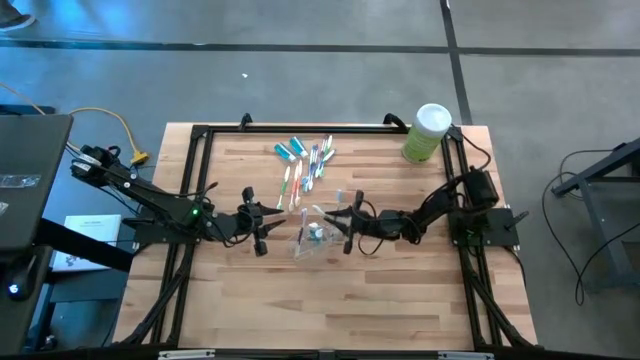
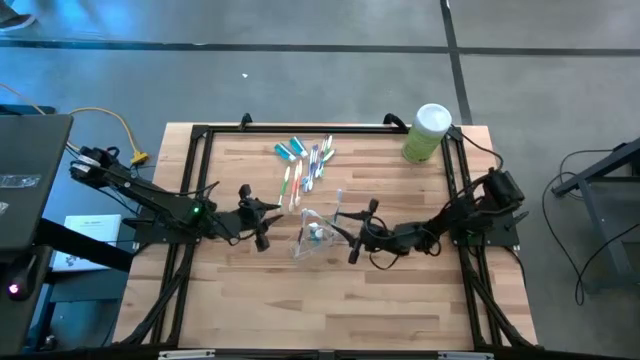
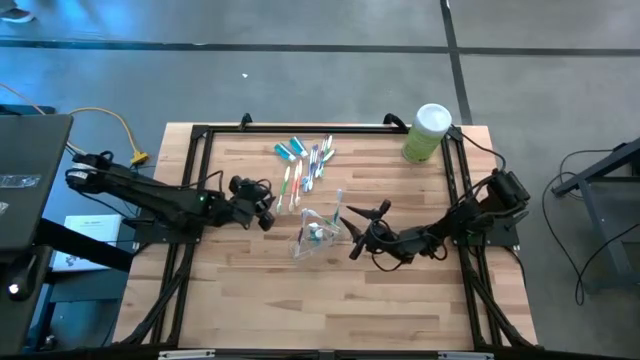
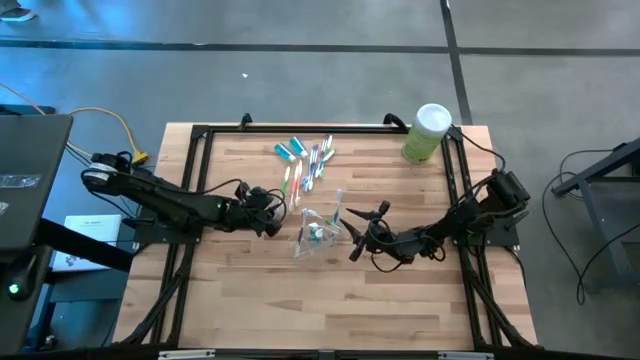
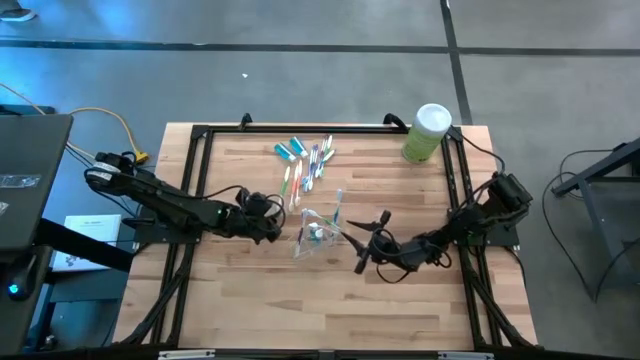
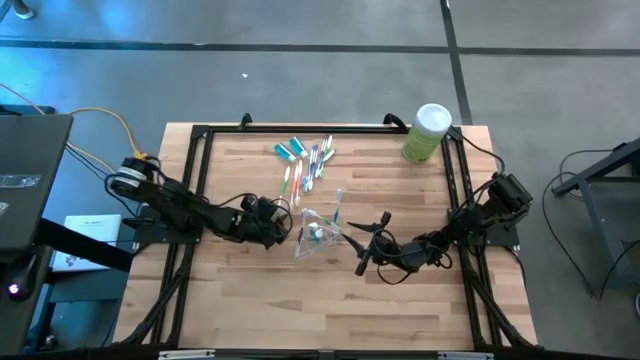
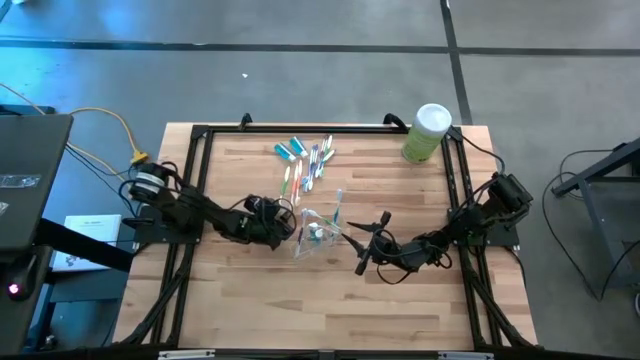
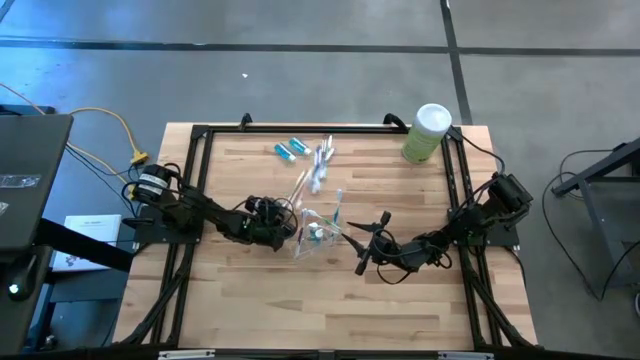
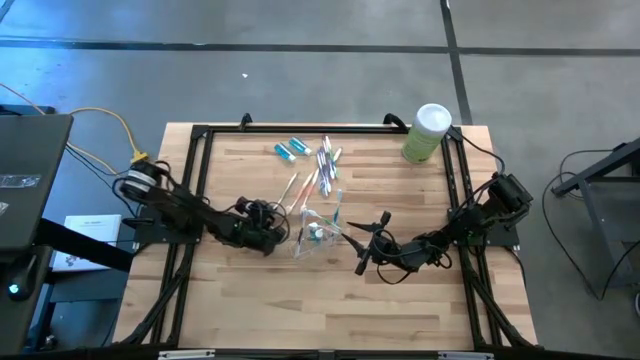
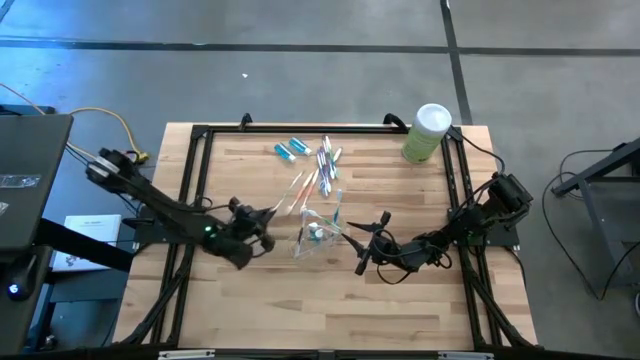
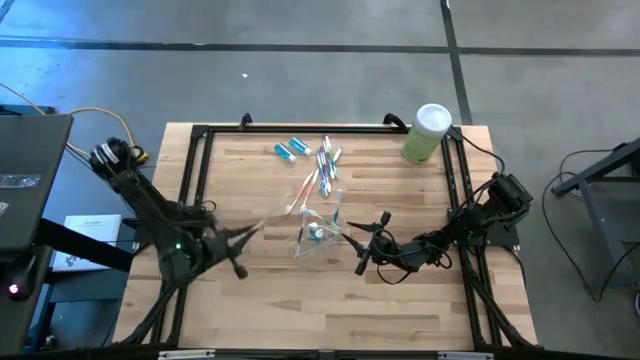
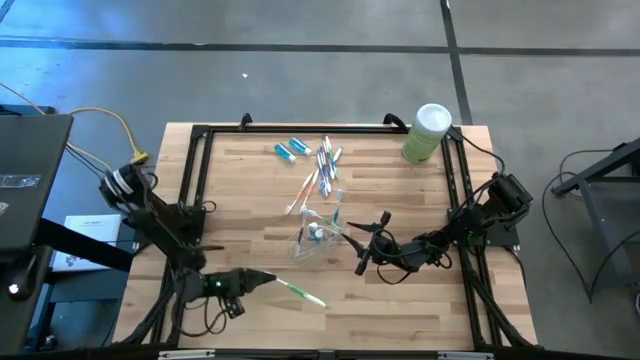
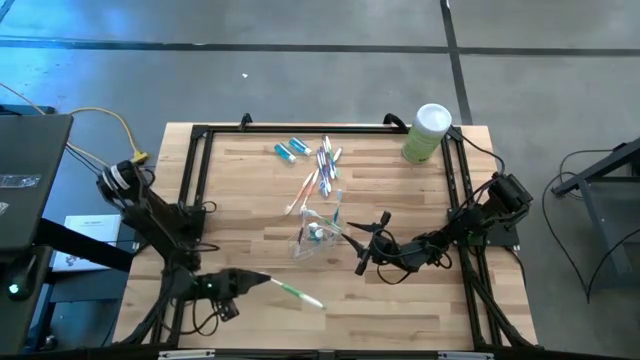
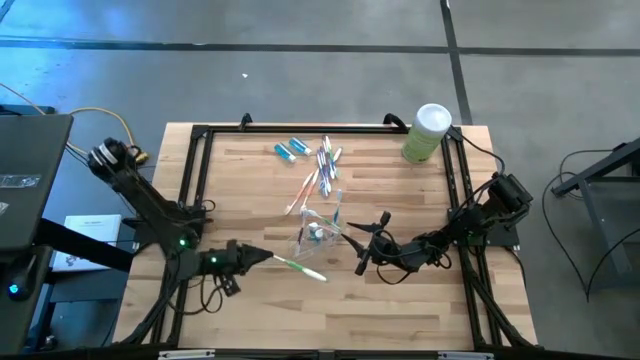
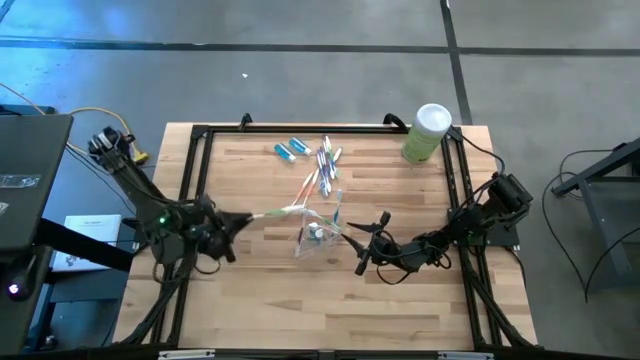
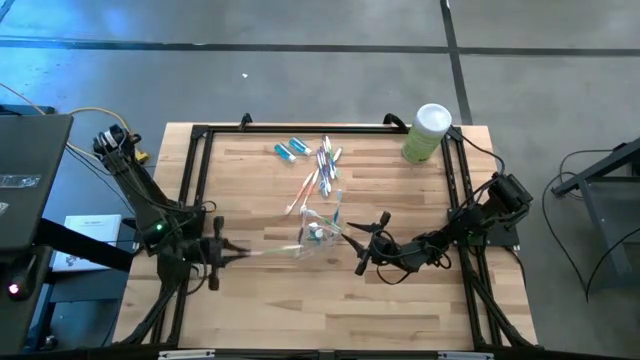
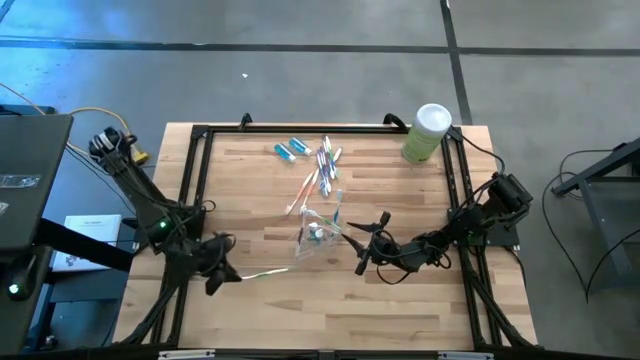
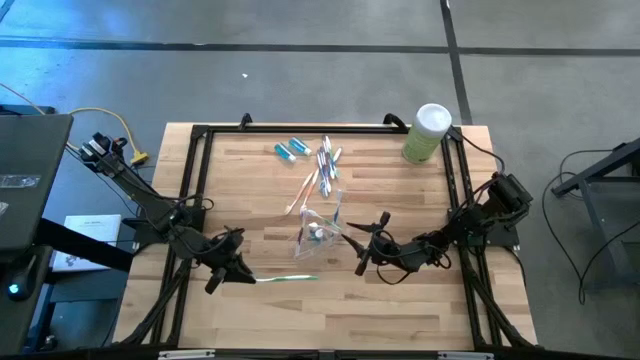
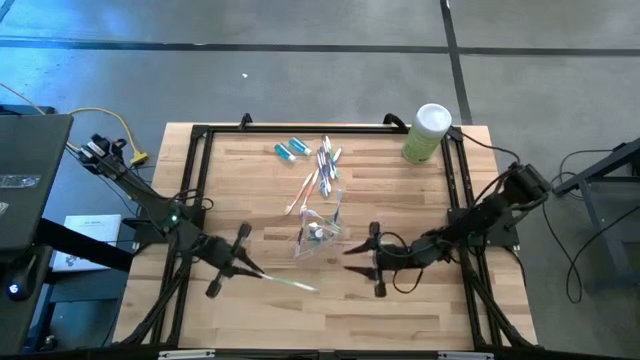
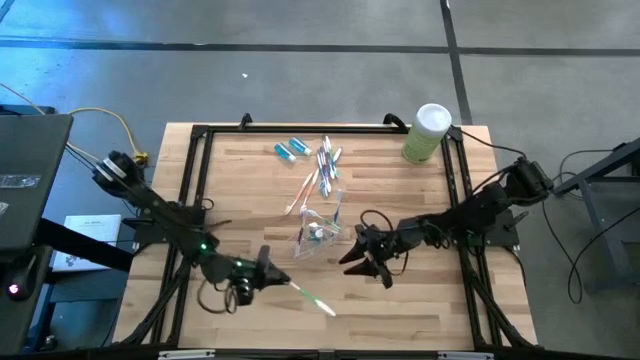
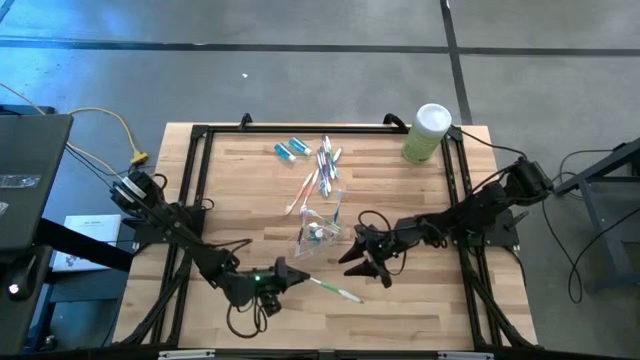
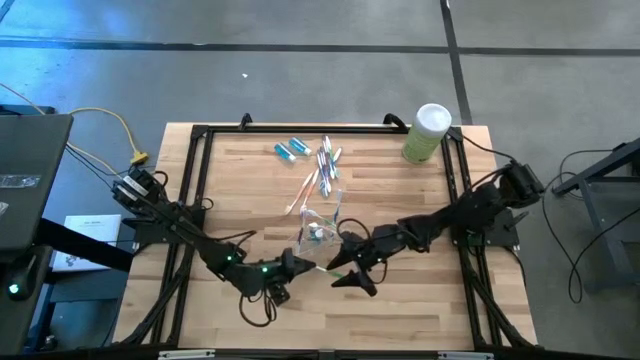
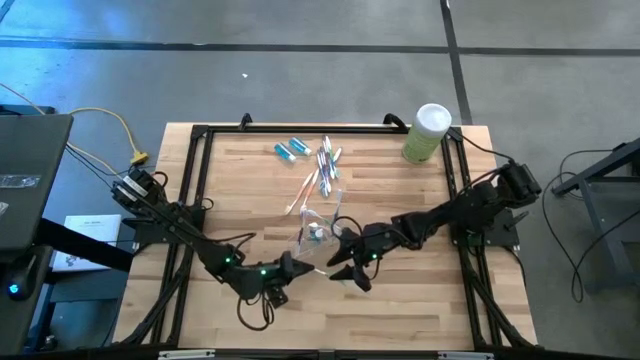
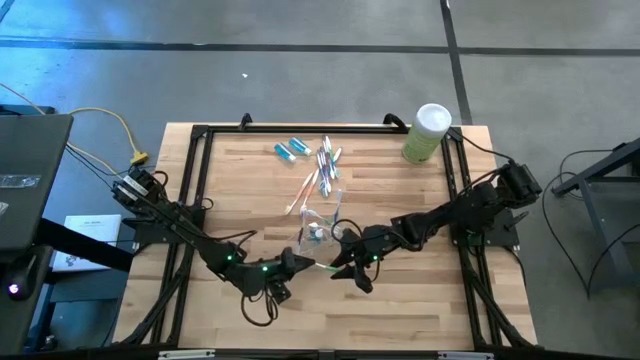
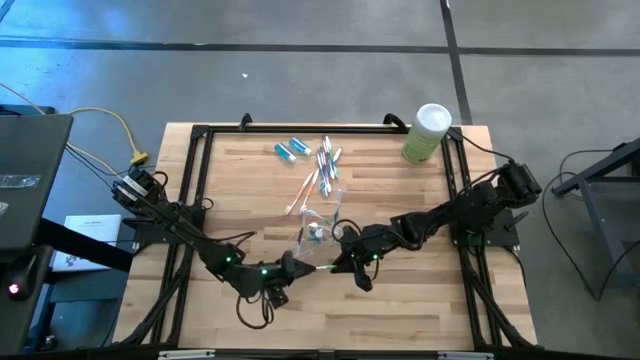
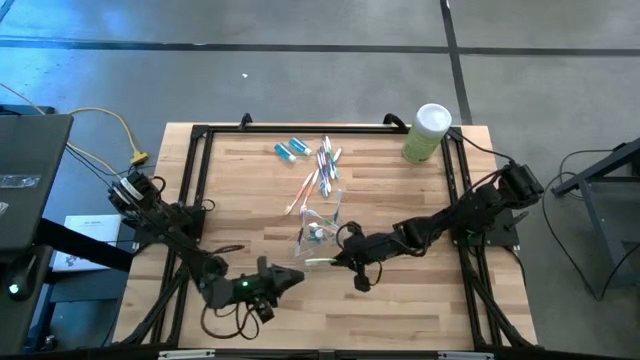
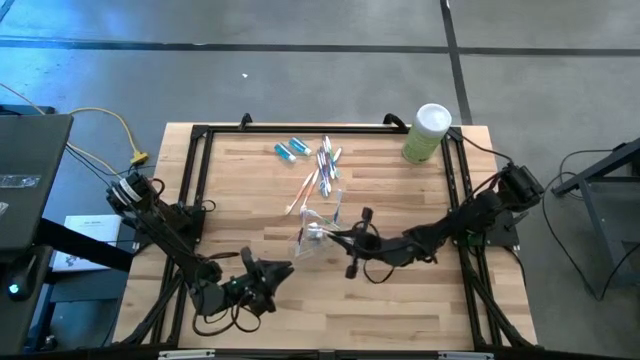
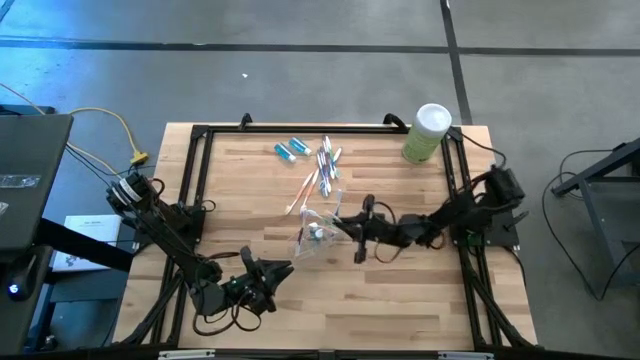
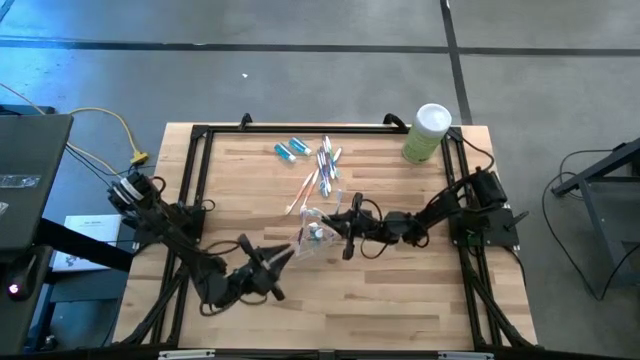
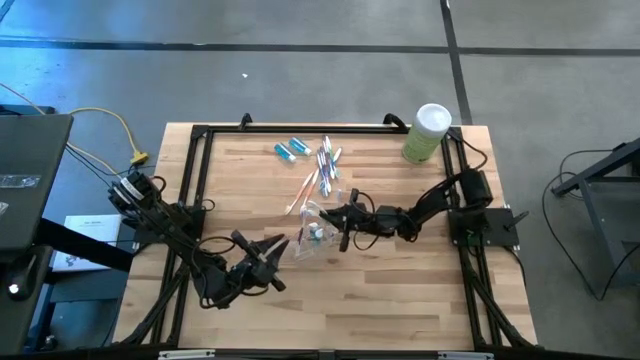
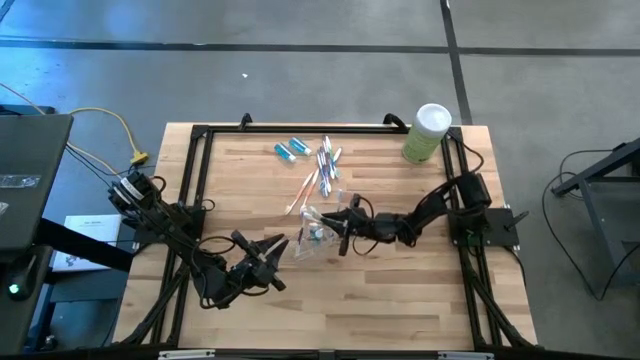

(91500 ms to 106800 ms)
Task: Pick & Place toothbrushing station
Put the green toothbrush into the transparent organizer

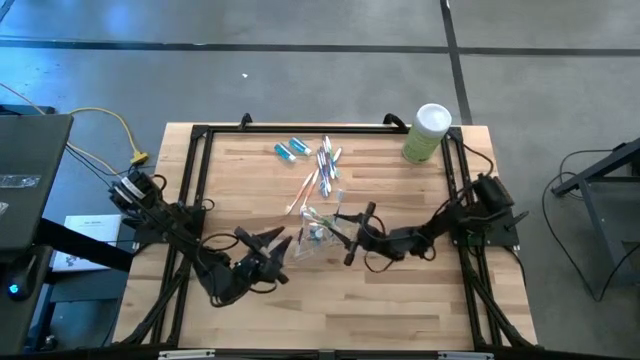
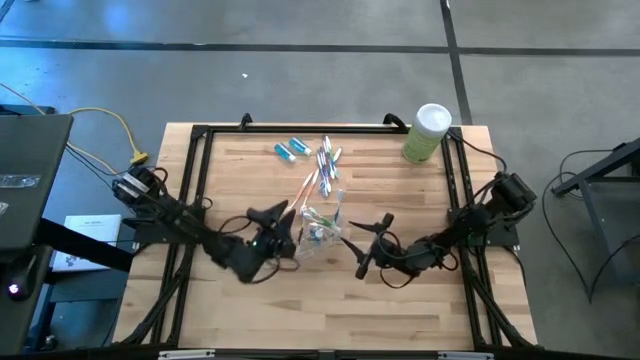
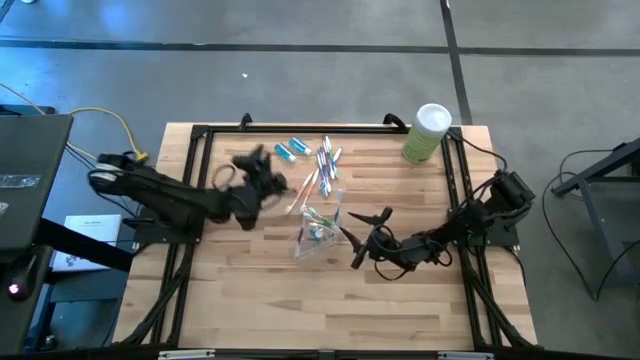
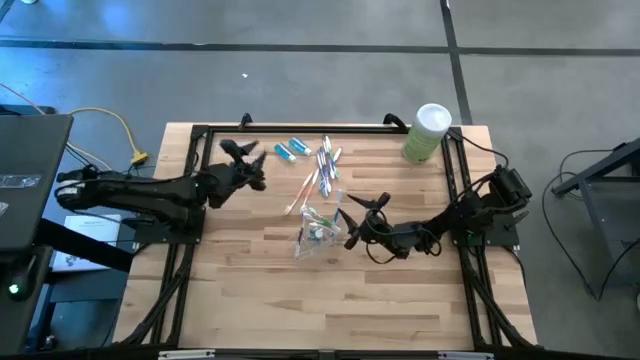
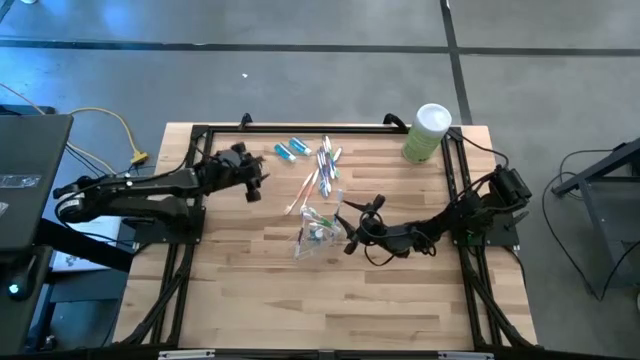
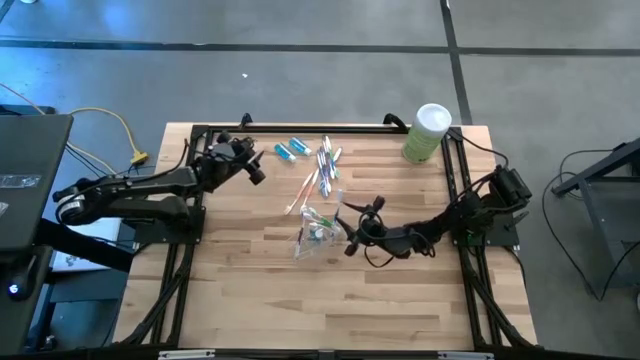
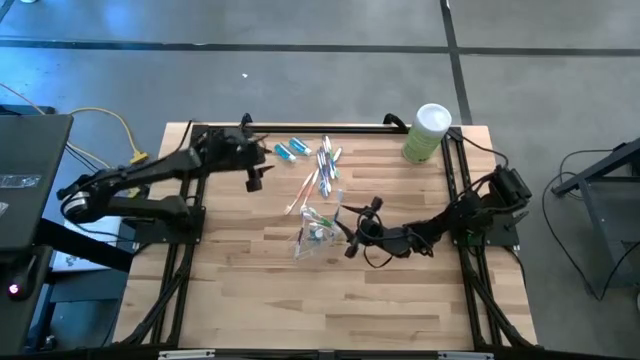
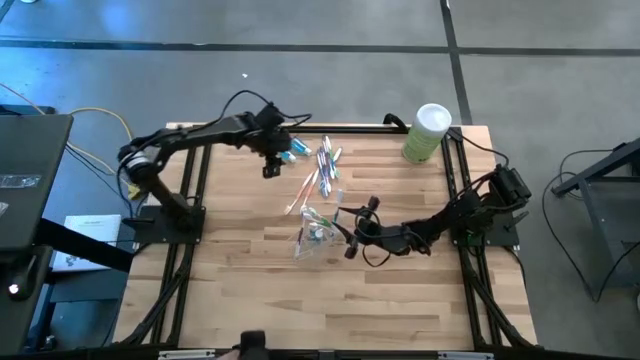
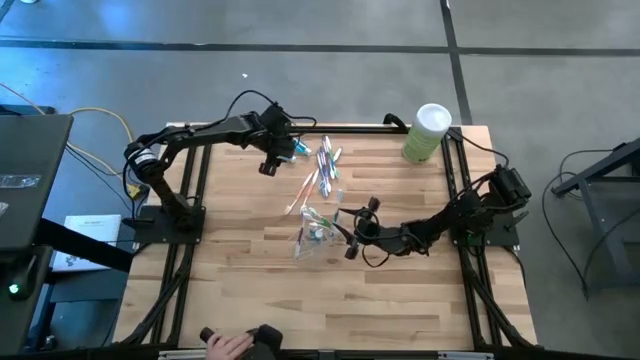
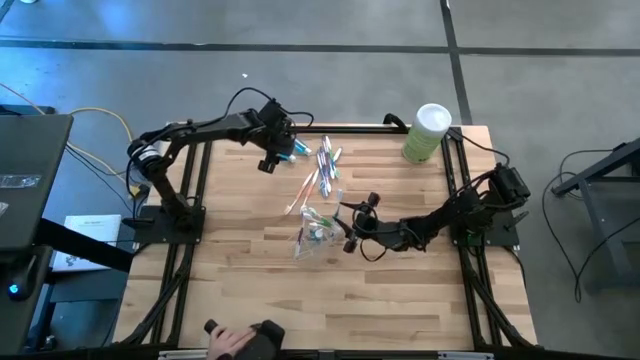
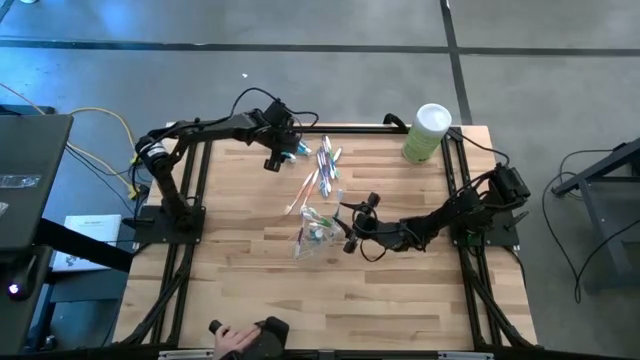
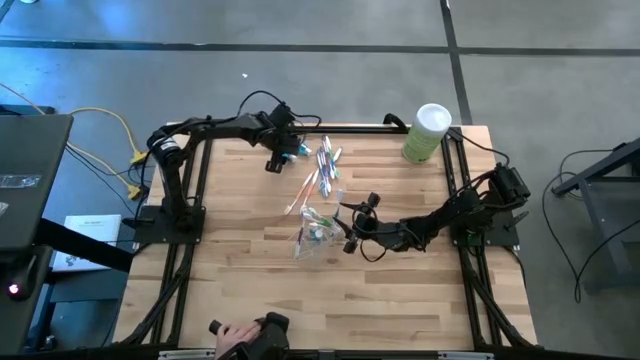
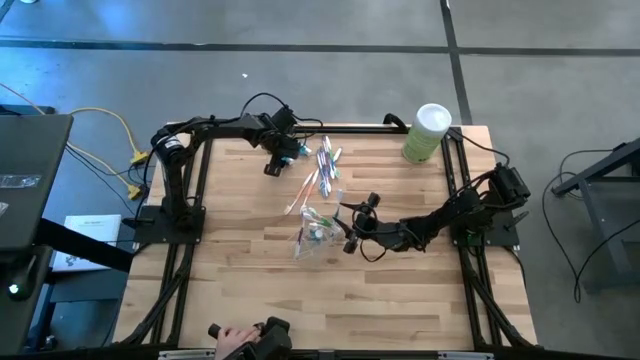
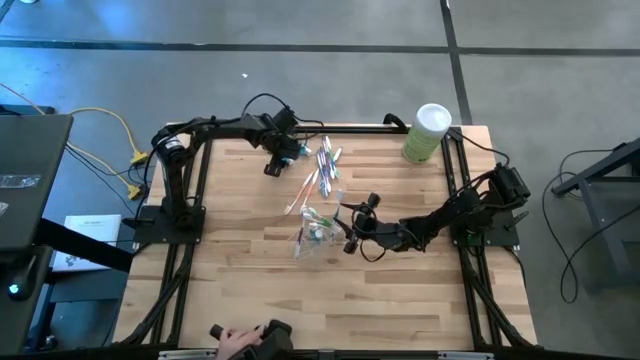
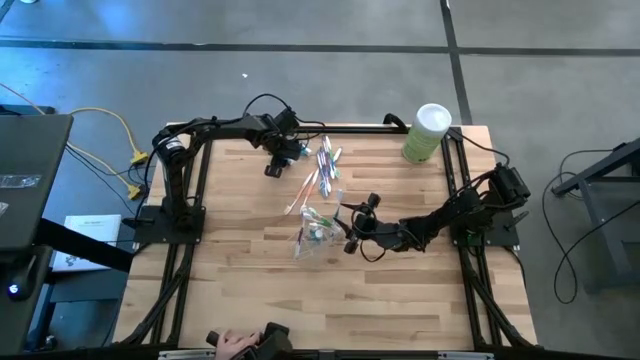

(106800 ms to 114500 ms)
Put the blue mouthwash into the transparent organizer
